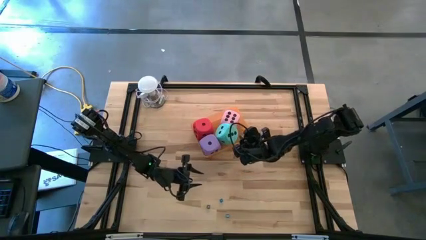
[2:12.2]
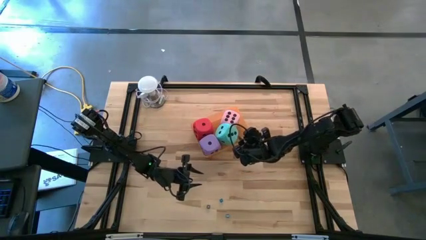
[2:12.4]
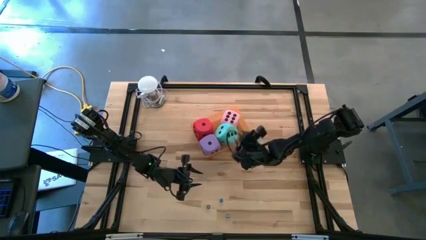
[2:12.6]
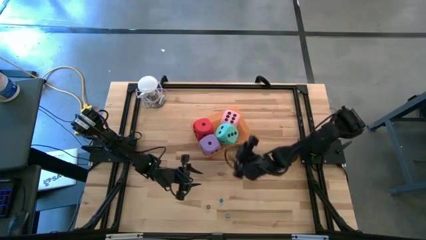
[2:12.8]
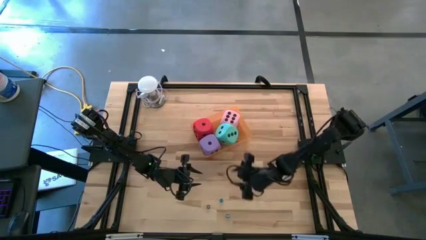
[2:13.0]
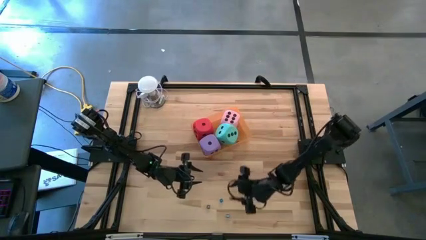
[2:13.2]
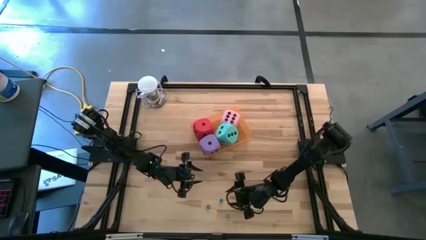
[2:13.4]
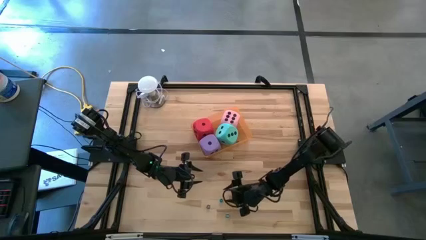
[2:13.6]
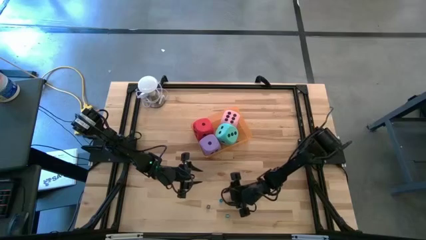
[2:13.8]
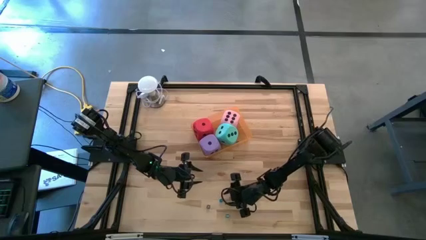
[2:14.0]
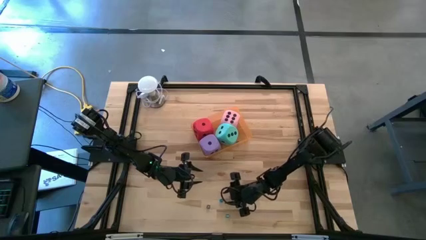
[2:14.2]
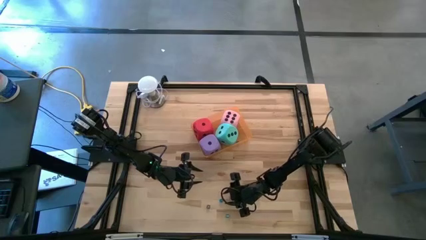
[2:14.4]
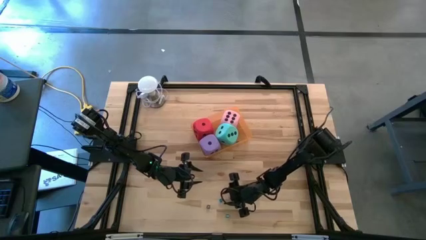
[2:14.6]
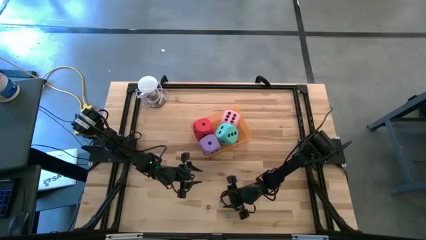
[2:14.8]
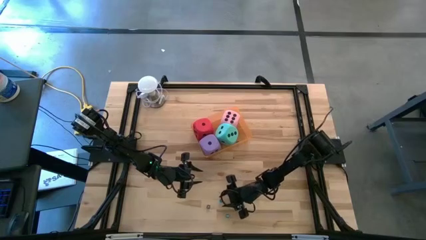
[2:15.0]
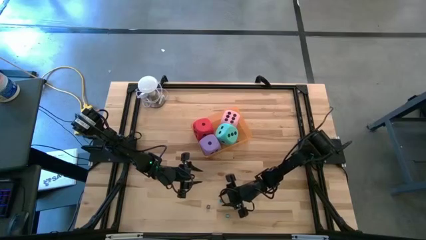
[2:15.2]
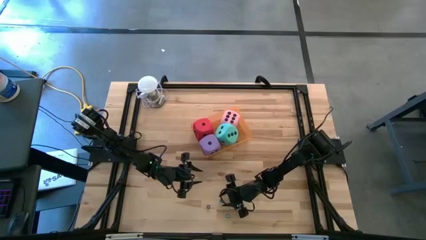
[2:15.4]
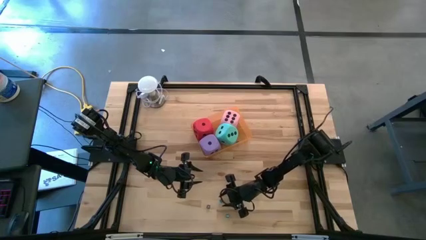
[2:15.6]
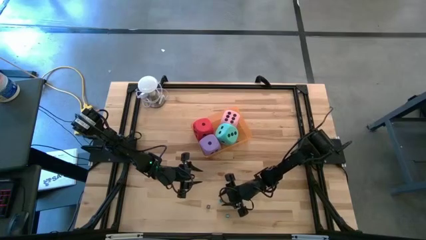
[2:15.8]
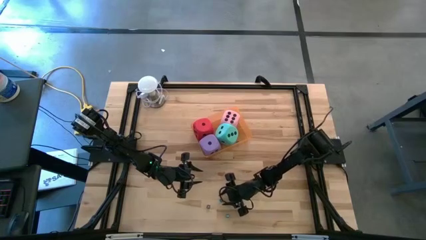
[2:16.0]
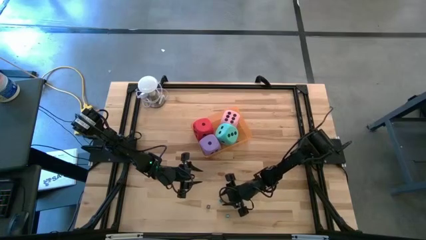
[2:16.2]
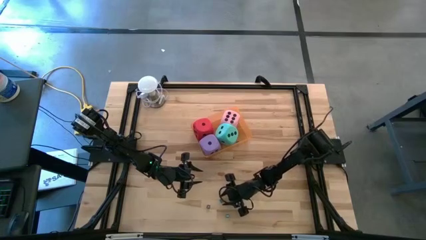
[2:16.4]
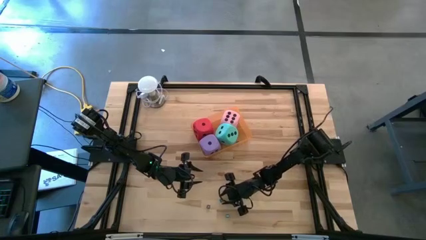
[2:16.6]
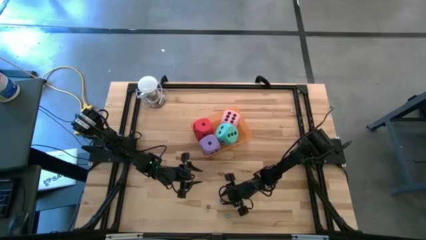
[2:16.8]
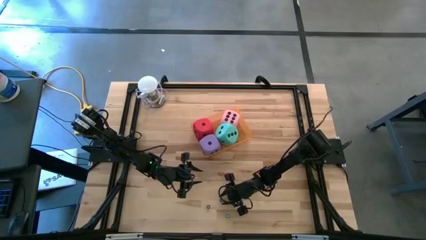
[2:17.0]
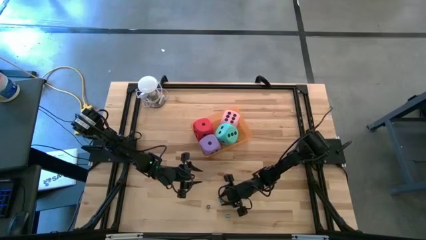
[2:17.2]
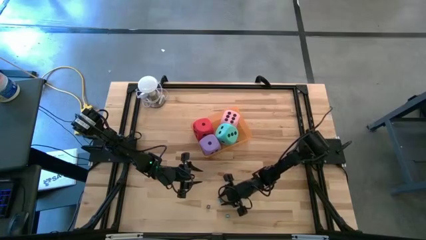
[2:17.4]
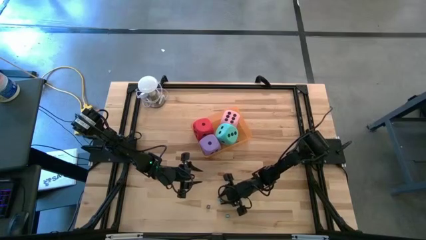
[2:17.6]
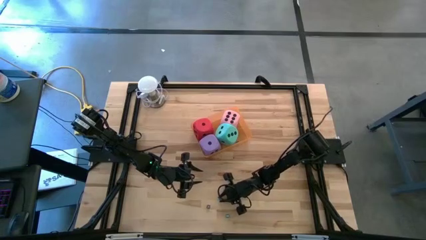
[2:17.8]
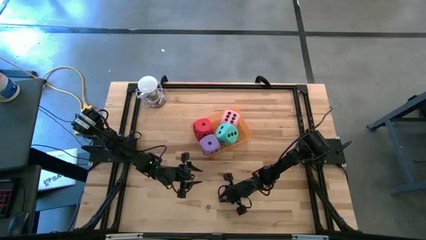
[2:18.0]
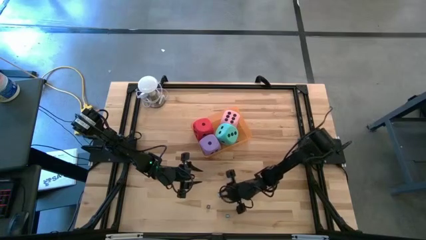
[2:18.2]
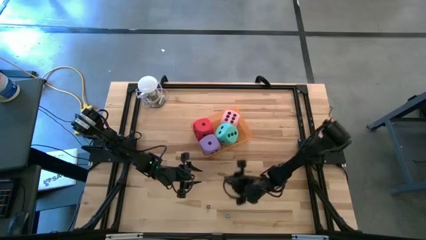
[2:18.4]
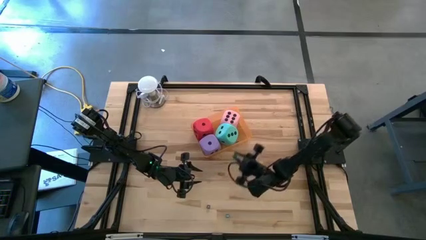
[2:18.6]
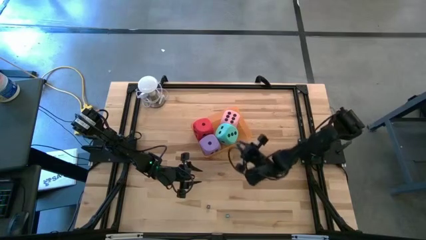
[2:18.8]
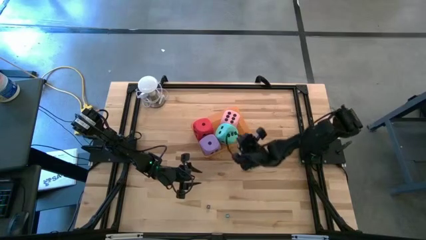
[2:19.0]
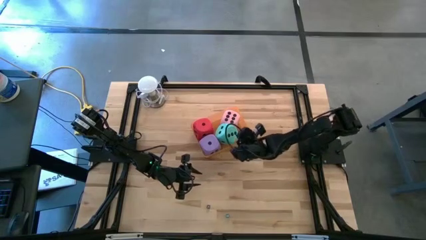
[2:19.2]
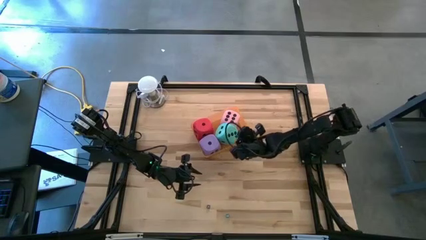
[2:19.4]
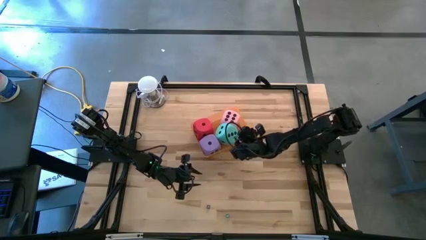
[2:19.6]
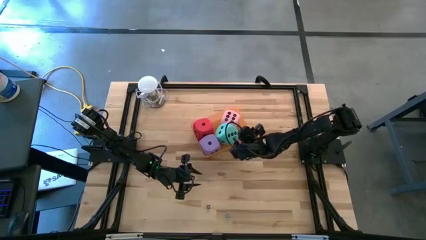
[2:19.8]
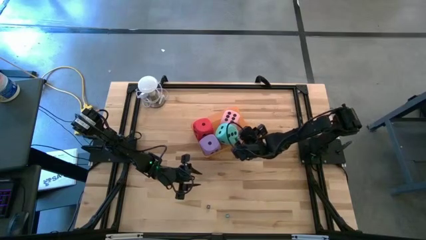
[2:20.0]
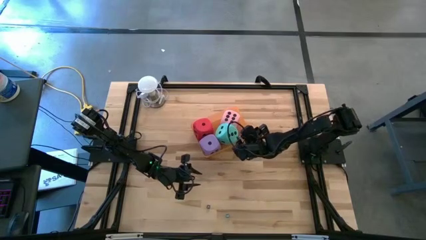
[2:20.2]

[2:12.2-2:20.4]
Task: Pick & Place Dice
Put the small blue dice into the orange bin

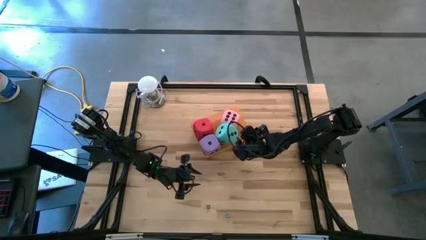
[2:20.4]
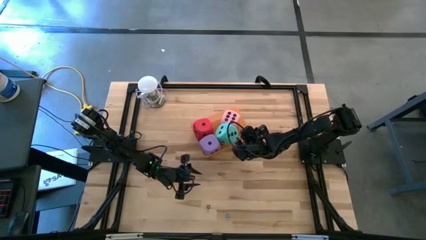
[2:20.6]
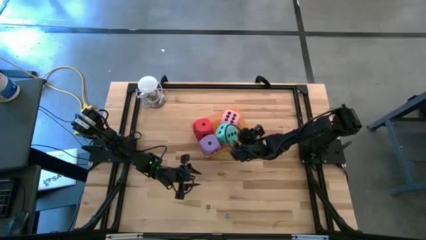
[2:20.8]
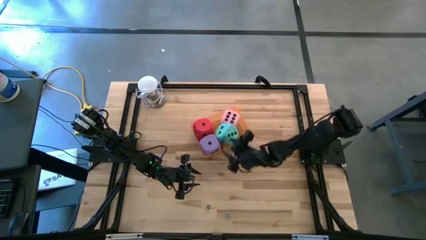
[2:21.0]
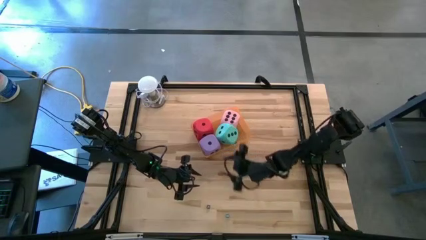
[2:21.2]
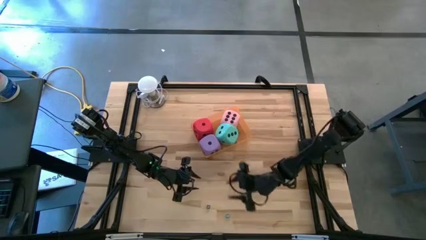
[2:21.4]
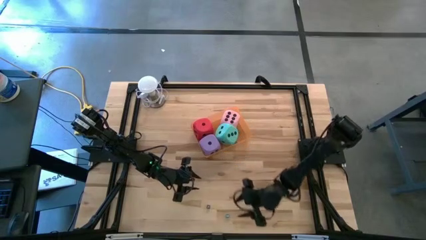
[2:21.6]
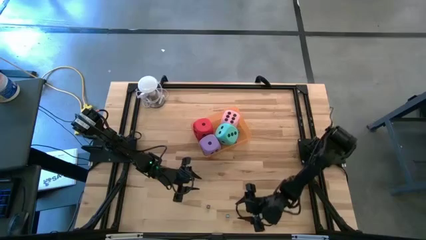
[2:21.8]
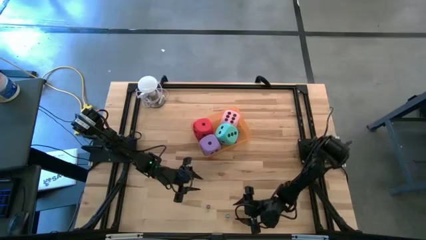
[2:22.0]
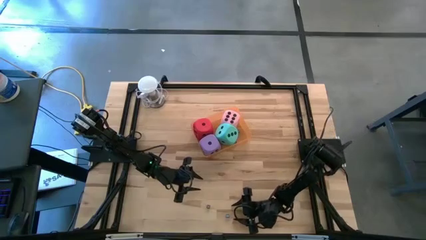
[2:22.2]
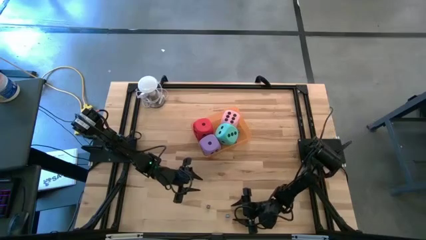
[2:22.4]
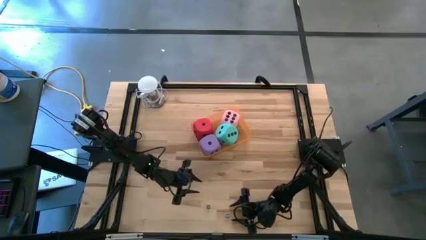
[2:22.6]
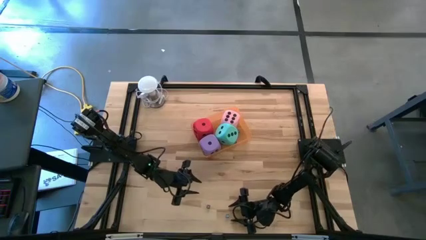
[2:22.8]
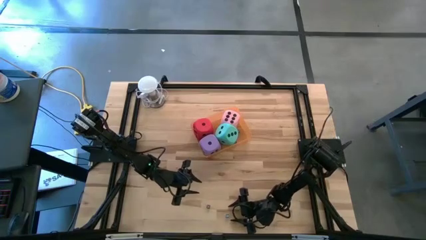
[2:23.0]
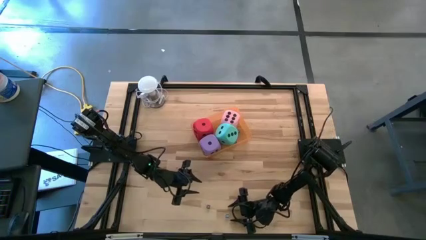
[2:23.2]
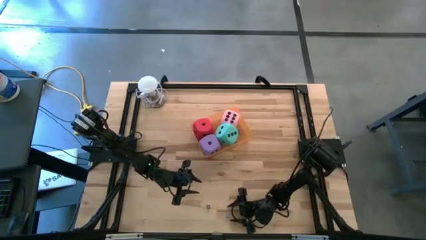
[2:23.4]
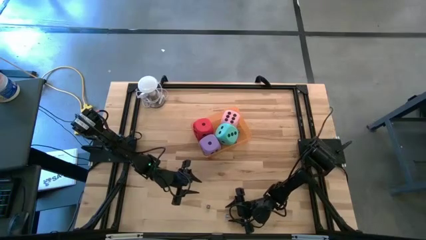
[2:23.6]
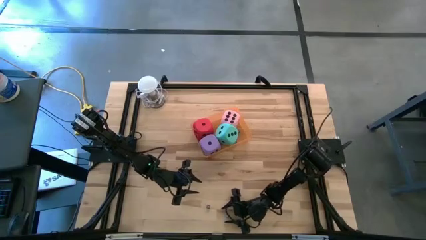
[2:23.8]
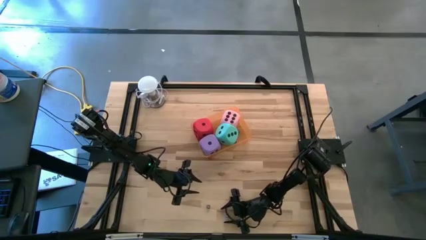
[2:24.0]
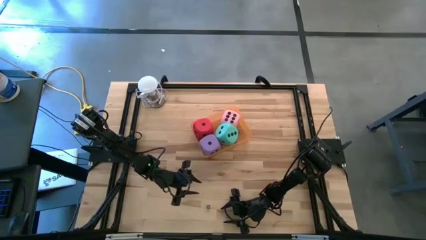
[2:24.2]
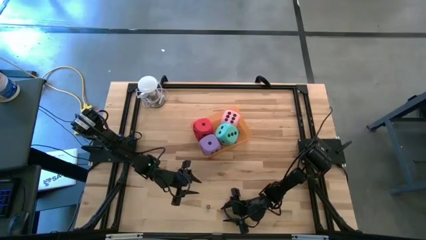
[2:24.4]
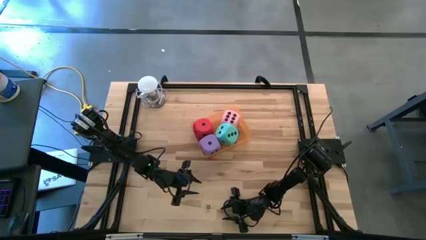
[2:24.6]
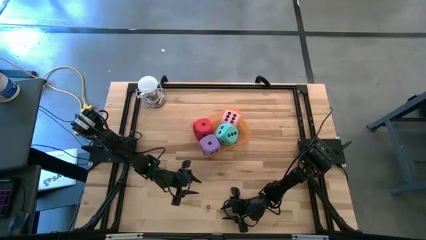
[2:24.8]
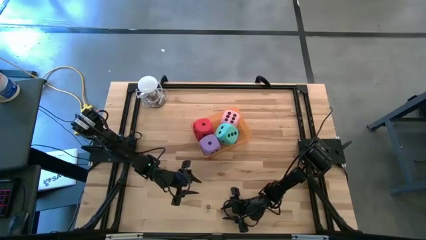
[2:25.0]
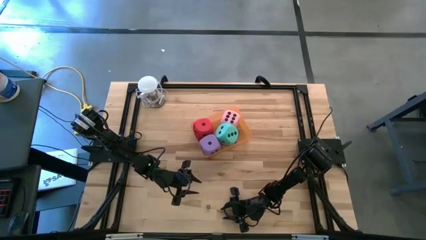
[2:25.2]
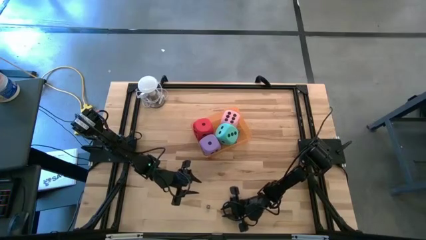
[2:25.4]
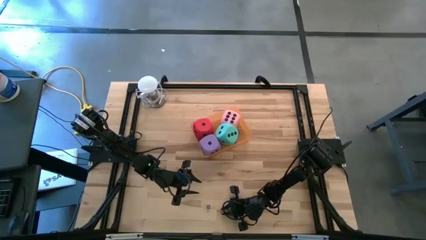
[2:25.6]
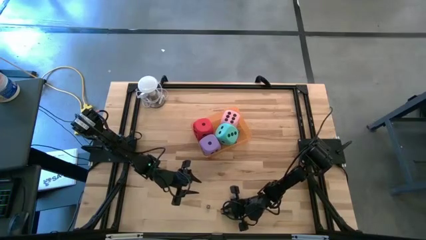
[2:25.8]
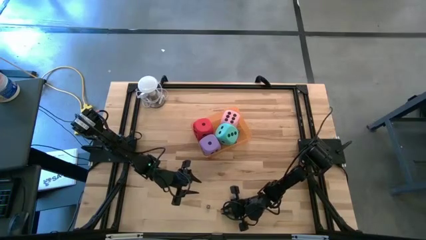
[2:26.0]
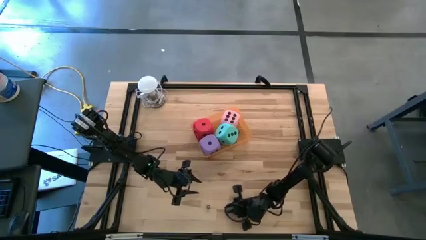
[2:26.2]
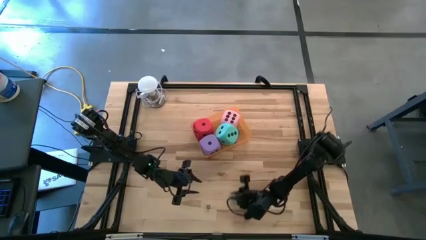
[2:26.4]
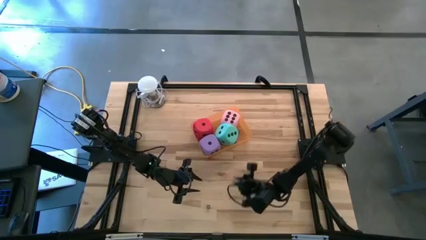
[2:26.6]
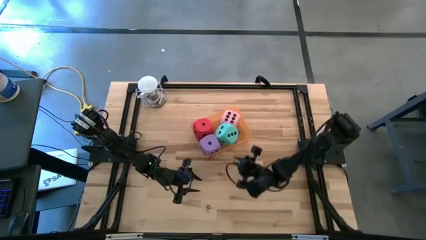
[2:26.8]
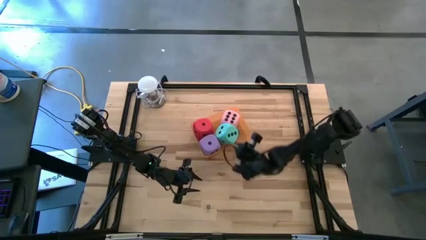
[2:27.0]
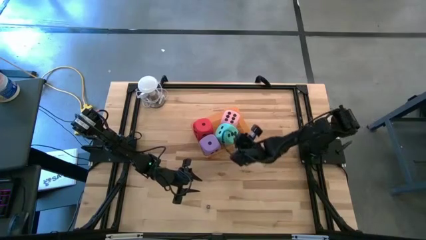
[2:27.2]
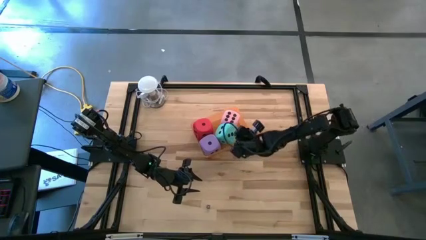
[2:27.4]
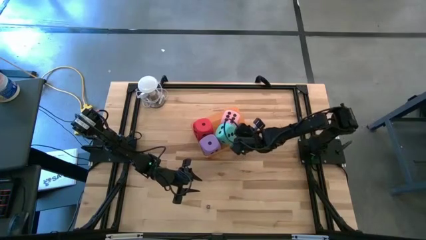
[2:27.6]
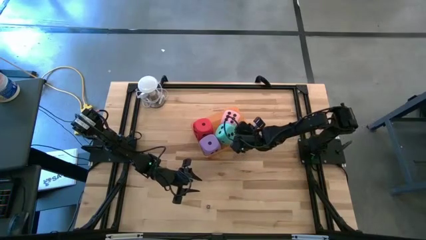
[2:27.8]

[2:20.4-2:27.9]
Put the small blue dice into the orange bin

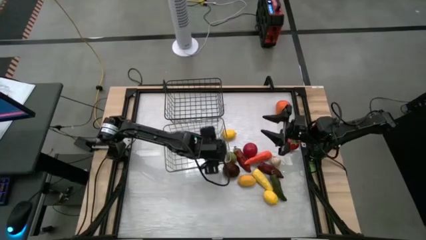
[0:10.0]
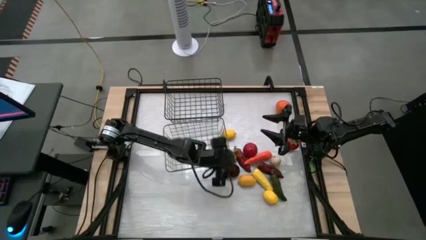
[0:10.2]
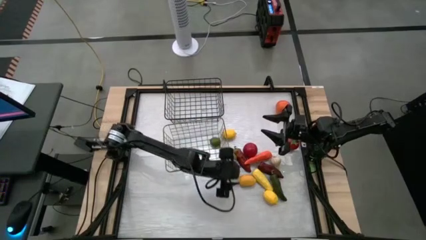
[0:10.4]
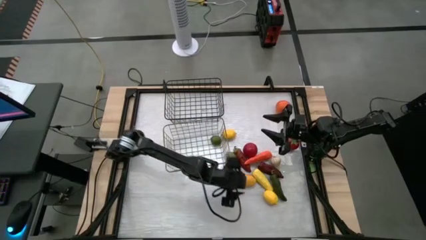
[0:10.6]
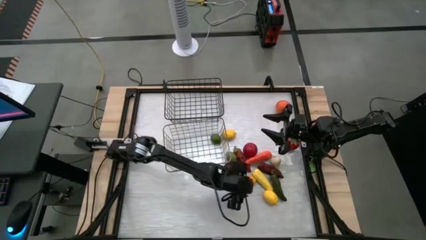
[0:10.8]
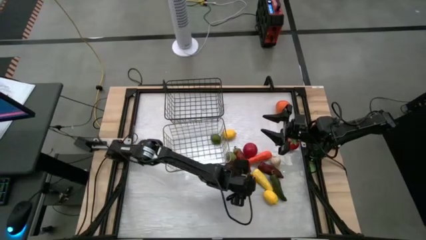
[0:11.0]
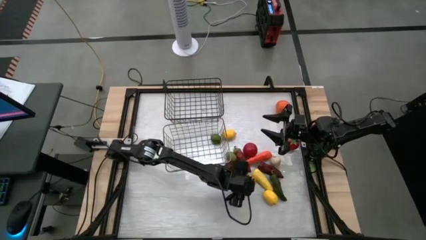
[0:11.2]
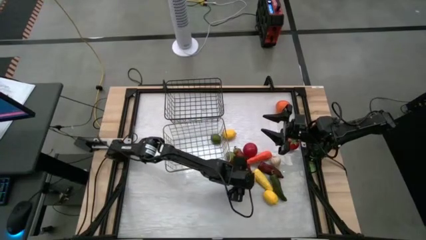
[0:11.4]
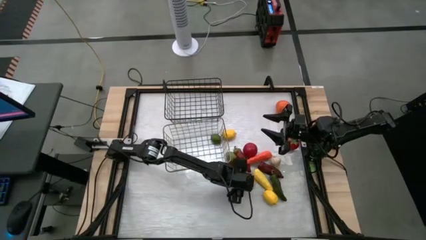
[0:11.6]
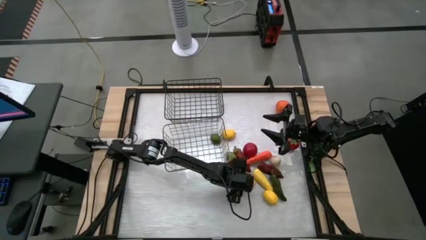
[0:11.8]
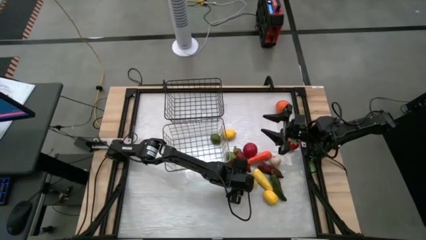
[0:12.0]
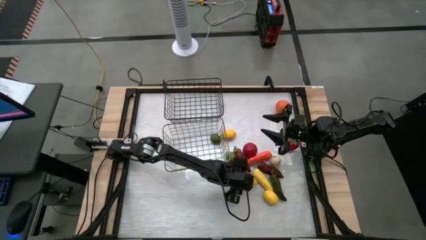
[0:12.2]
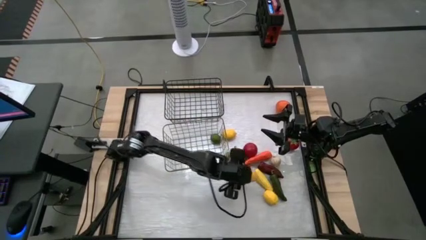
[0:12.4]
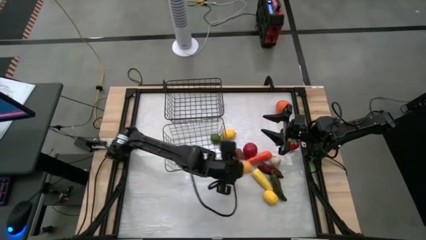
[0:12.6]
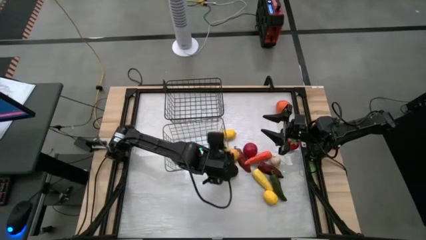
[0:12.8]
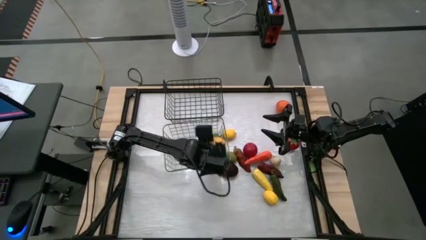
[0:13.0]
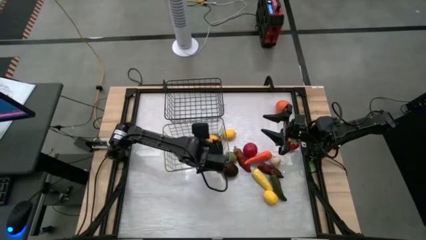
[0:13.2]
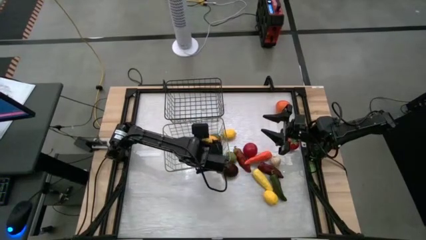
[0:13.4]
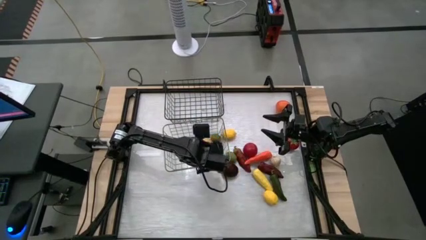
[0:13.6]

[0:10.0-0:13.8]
Task: Sort produce into baskets
Put the center yellow lemon into the brown wire basket
